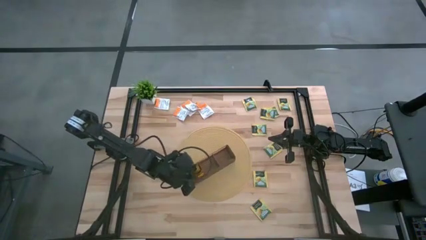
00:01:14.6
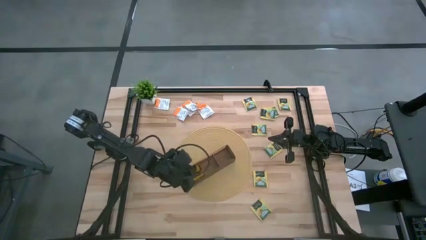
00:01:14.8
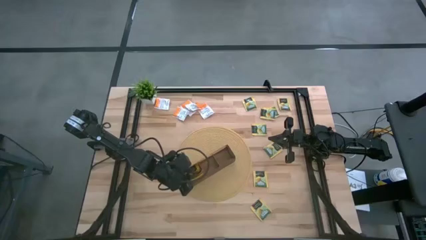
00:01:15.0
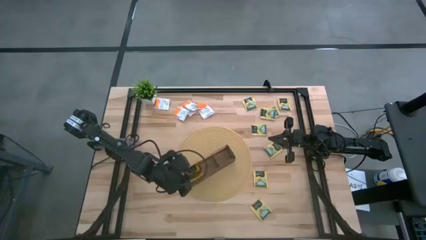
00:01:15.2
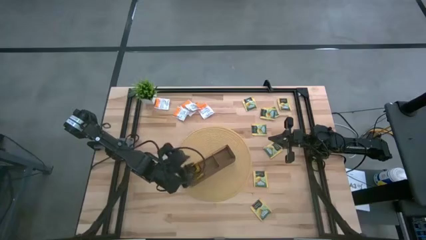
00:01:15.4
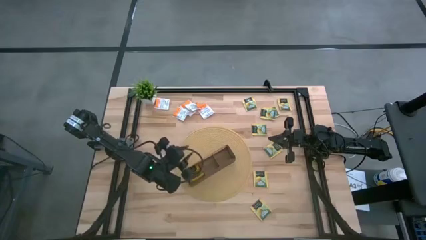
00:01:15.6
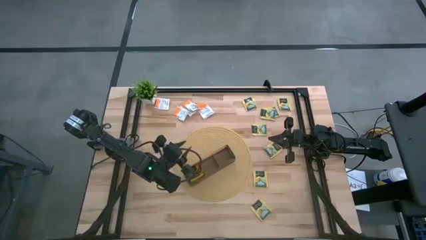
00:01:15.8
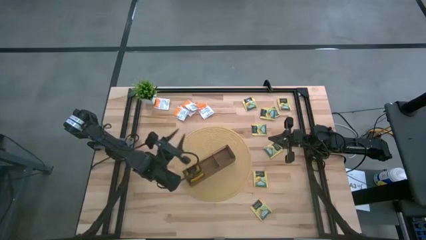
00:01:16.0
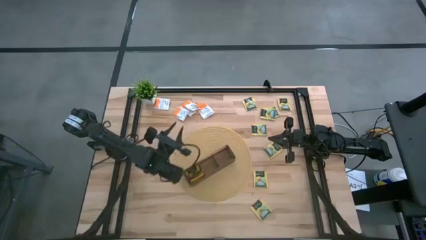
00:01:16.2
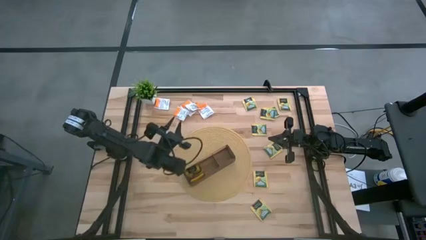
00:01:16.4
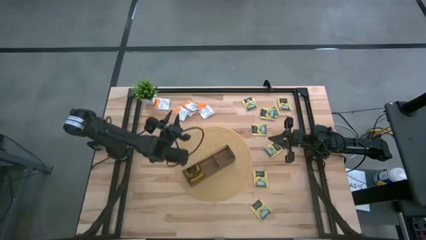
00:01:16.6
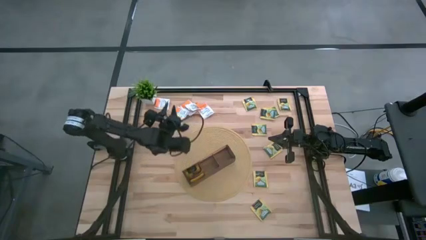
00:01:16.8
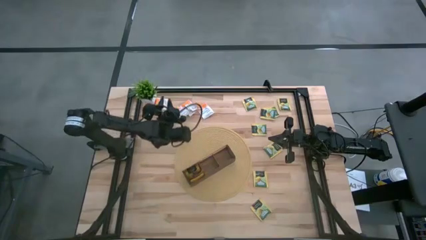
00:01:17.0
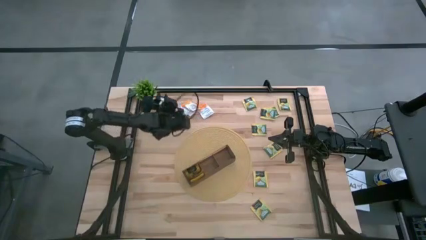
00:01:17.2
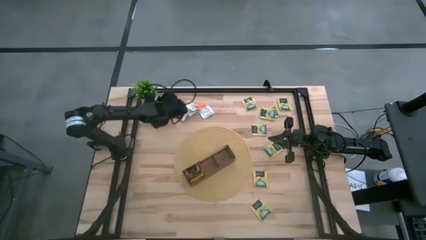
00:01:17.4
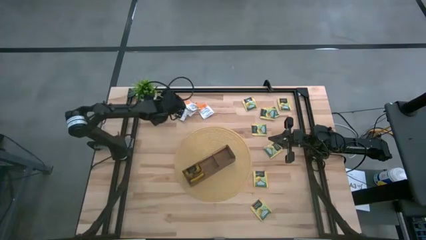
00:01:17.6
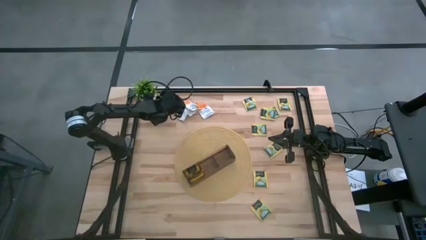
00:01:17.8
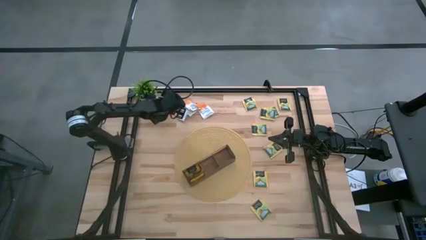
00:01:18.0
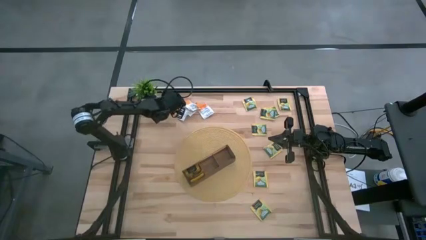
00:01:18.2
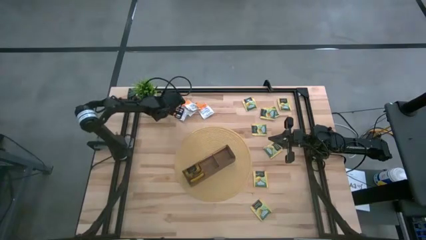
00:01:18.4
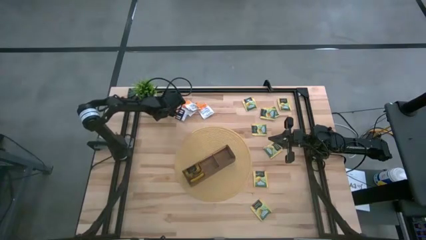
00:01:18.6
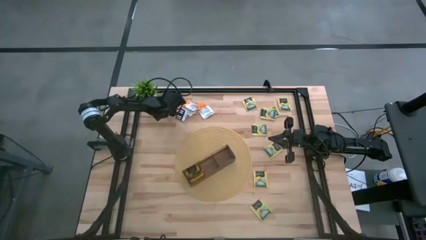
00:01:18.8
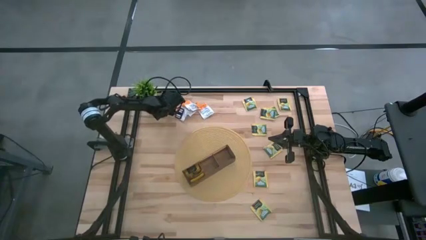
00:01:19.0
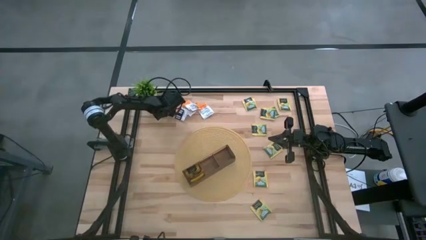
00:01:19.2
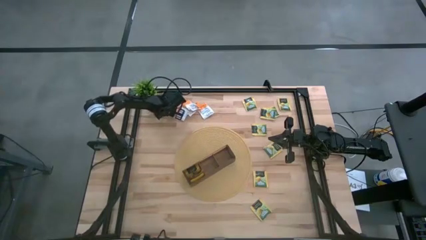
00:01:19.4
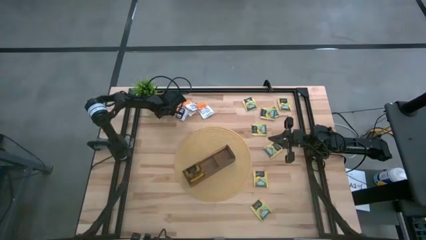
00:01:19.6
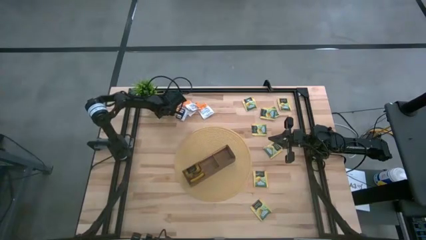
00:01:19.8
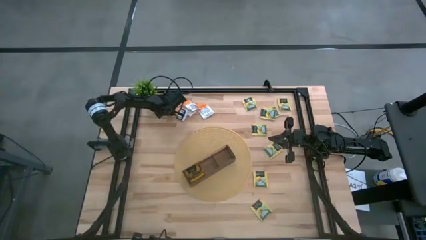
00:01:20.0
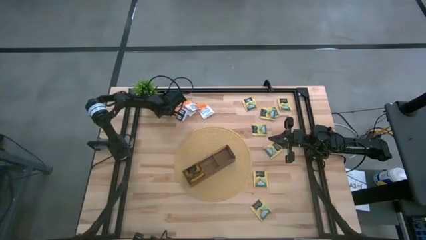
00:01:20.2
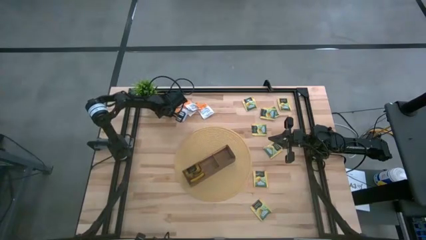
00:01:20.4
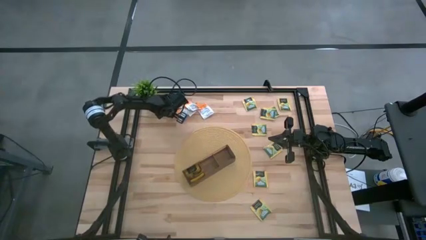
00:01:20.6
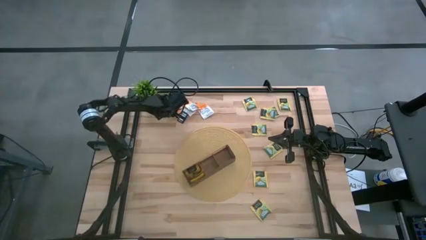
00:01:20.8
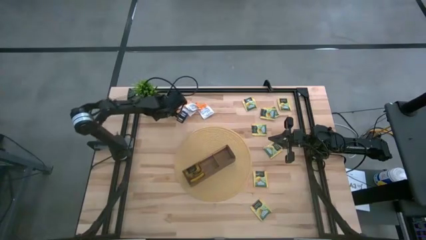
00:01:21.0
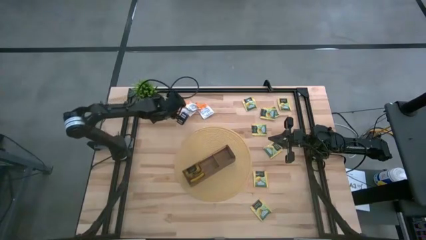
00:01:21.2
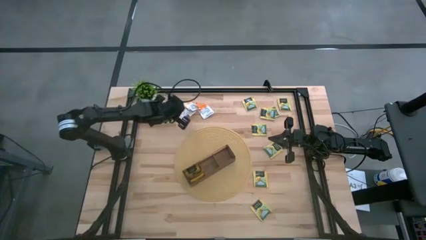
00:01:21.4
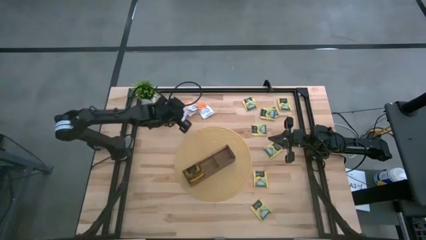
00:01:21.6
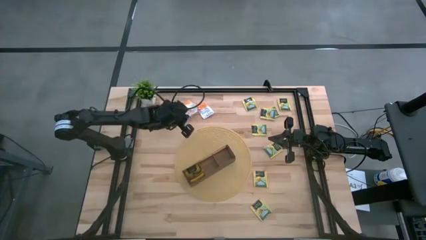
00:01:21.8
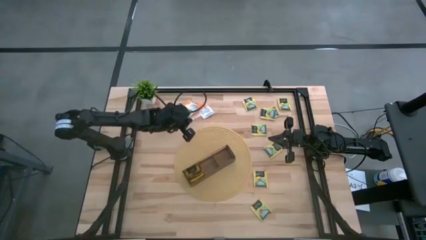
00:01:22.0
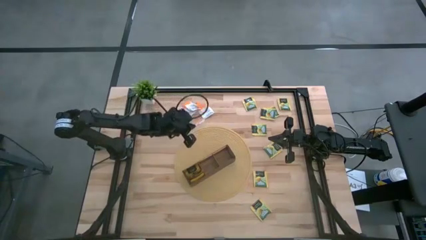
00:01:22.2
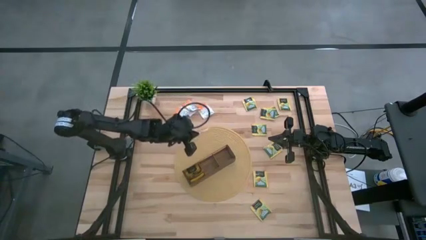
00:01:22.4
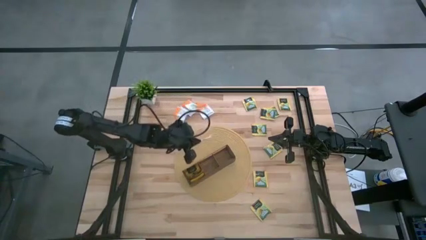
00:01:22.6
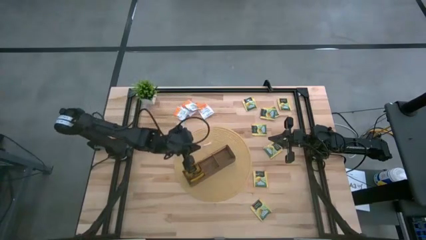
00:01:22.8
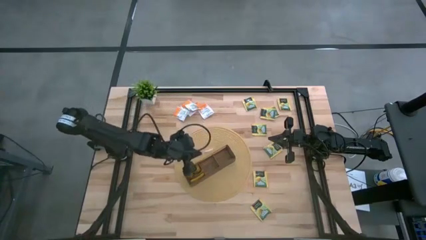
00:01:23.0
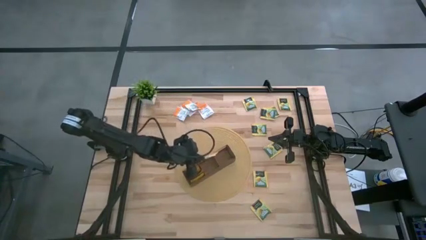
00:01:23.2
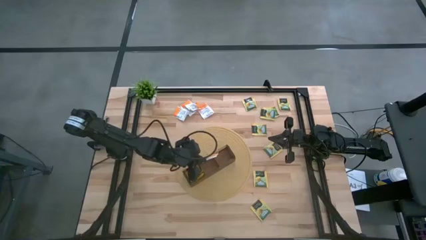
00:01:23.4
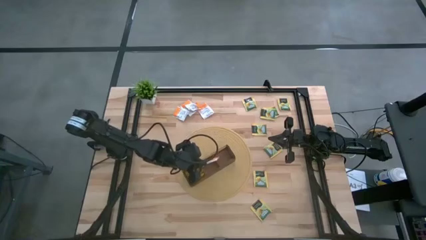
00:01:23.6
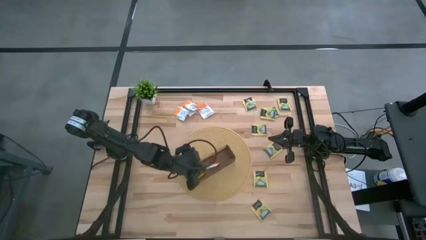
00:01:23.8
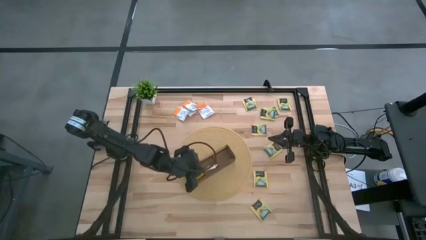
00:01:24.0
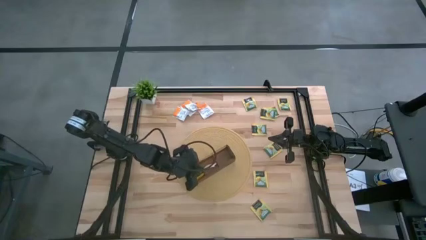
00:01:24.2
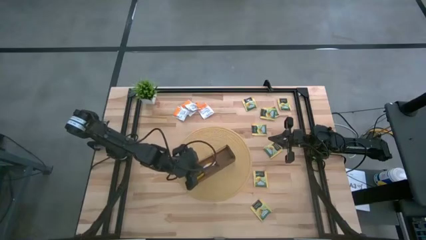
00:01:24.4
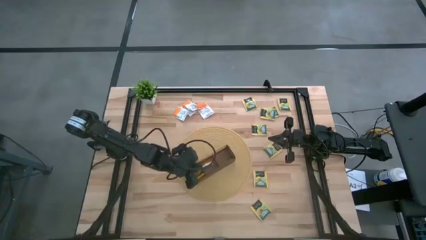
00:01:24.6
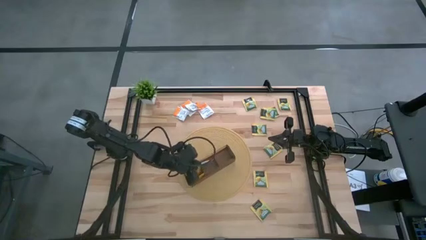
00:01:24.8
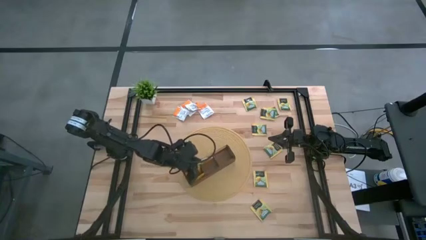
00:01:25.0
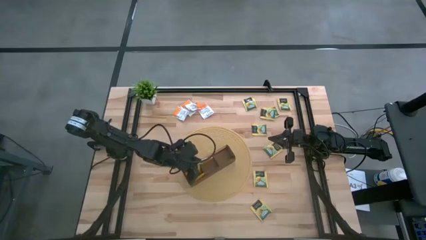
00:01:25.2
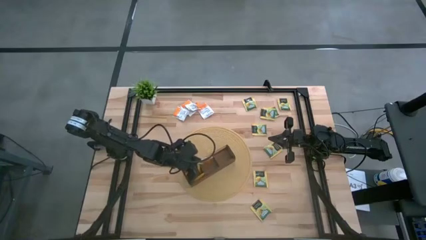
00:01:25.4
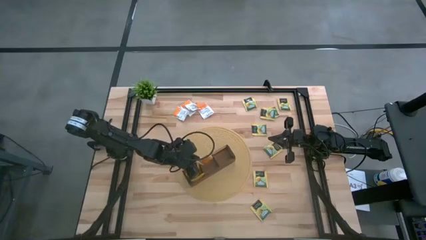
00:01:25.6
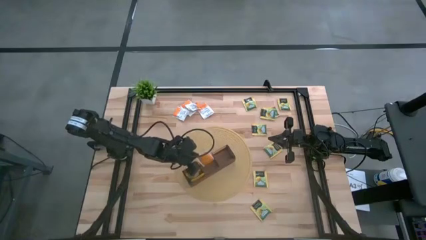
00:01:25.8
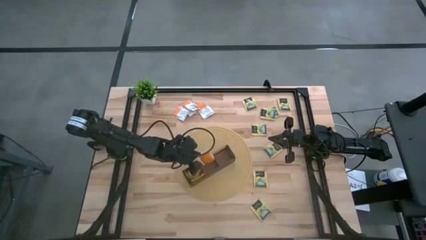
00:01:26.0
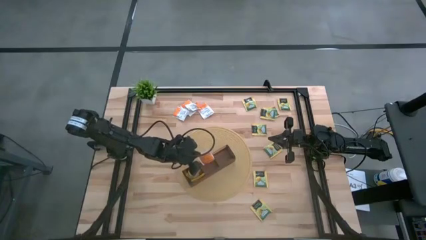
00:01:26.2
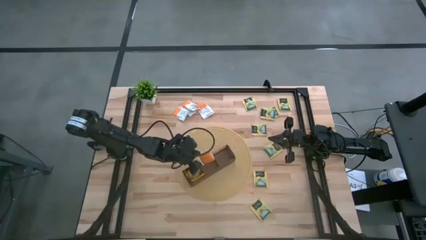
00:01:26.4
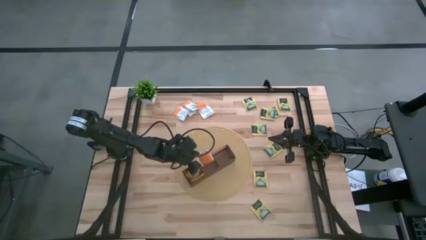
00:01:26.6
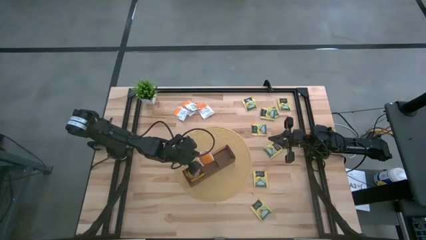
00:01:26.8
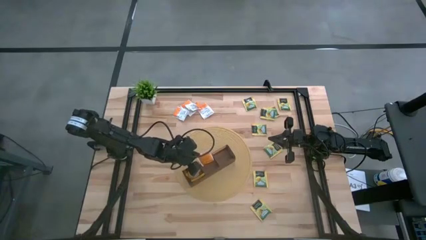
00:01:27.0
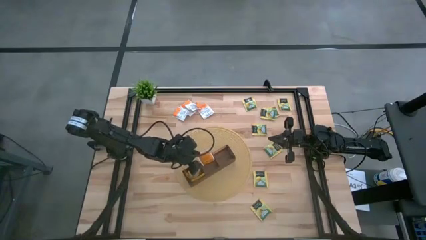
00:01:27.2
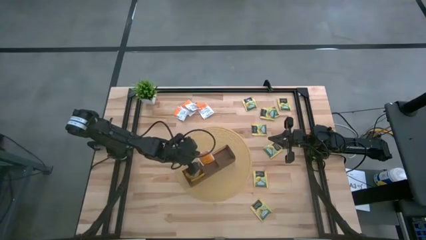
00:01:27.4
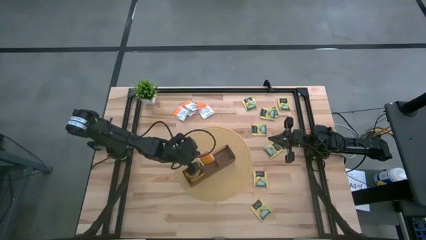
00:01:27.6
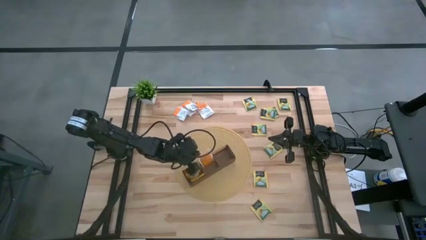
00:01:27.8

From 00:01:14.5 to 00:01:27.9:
Task: Pick & Place Tea
Put the orange tea sachet into the mid section of the wooden organizer
